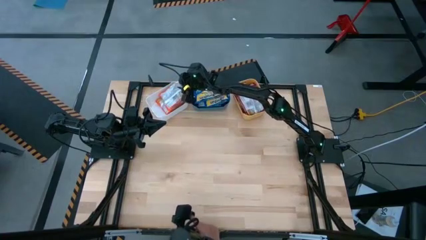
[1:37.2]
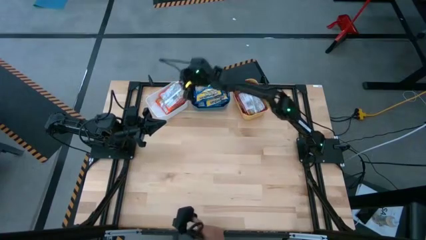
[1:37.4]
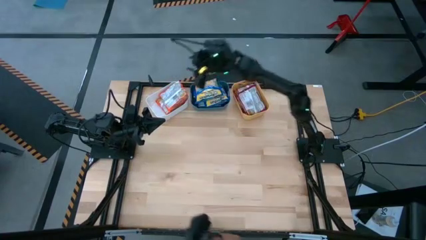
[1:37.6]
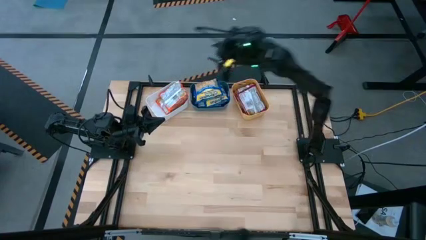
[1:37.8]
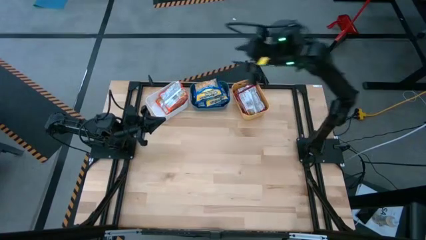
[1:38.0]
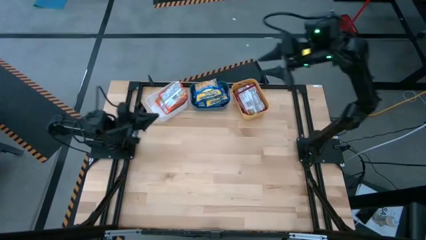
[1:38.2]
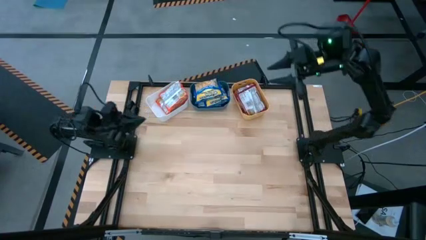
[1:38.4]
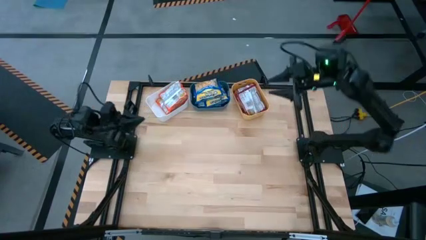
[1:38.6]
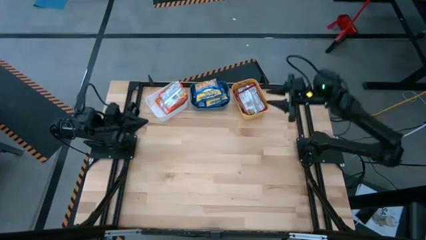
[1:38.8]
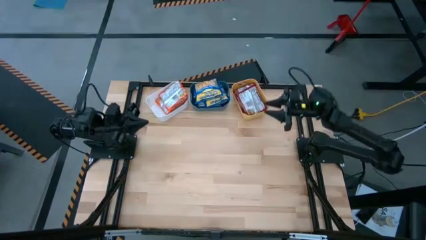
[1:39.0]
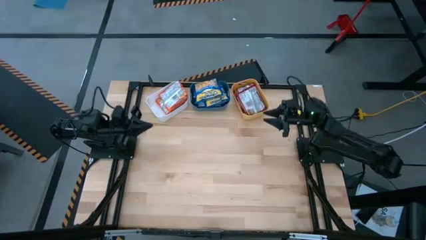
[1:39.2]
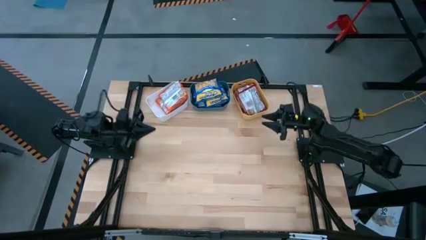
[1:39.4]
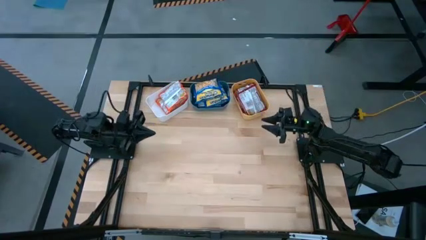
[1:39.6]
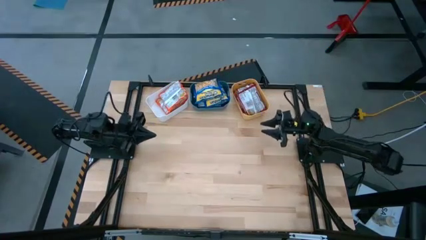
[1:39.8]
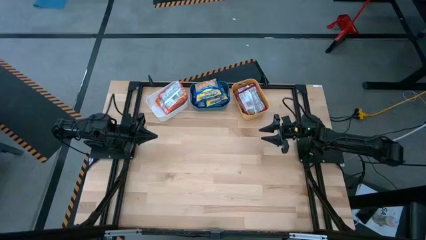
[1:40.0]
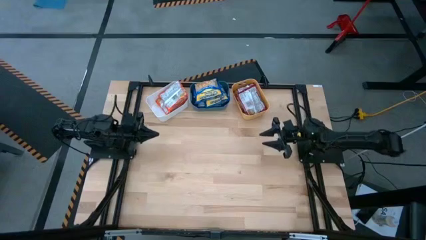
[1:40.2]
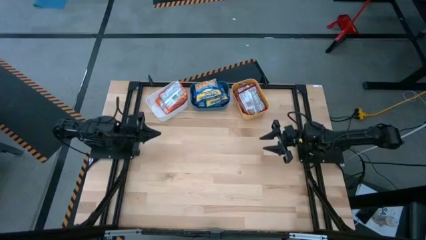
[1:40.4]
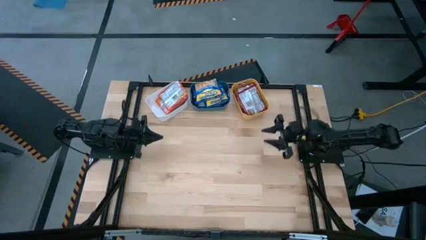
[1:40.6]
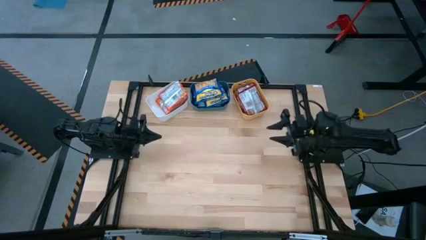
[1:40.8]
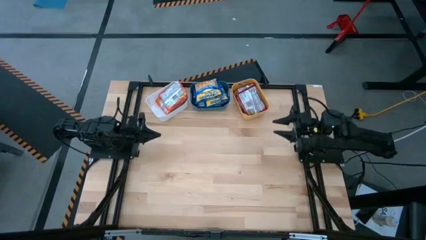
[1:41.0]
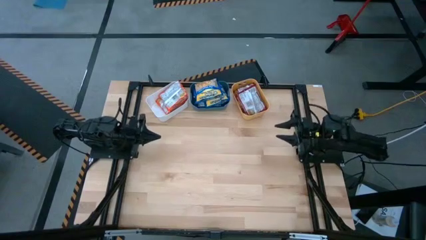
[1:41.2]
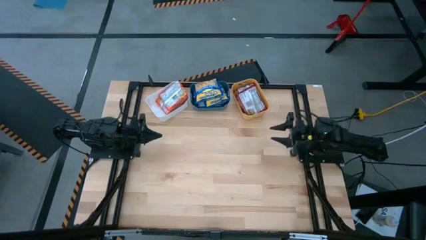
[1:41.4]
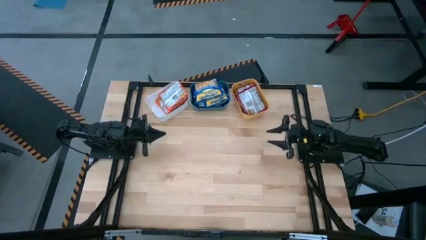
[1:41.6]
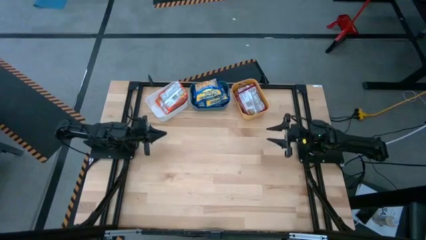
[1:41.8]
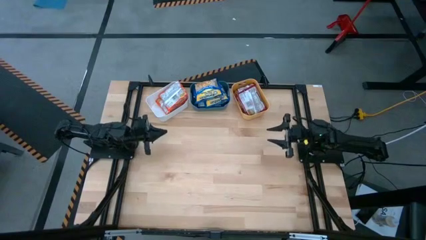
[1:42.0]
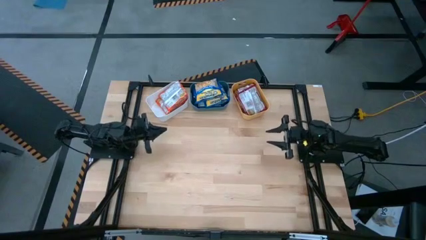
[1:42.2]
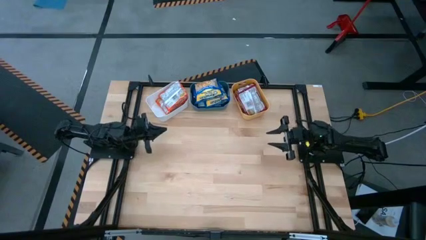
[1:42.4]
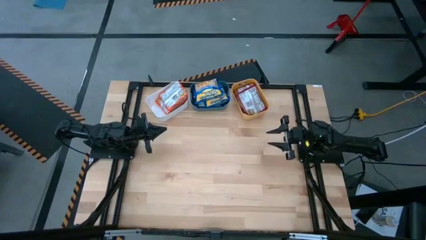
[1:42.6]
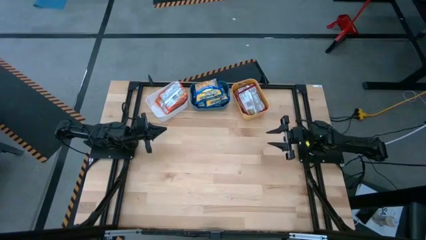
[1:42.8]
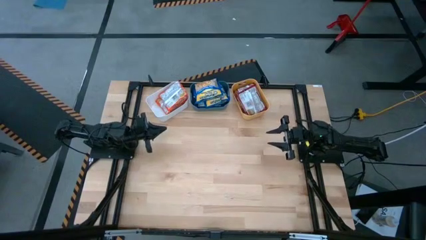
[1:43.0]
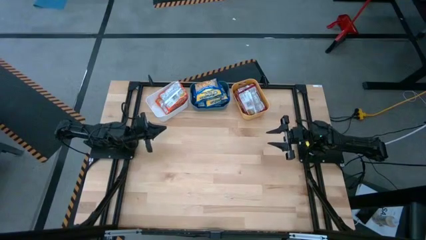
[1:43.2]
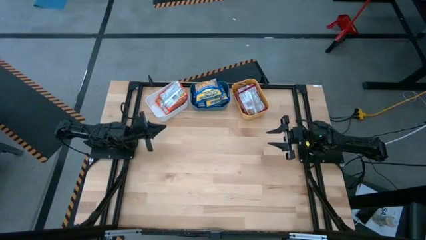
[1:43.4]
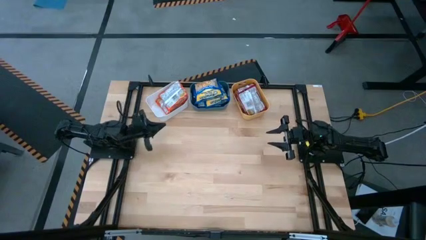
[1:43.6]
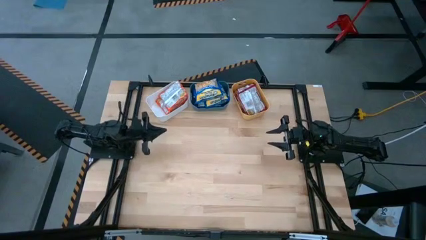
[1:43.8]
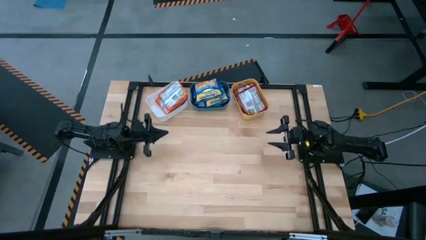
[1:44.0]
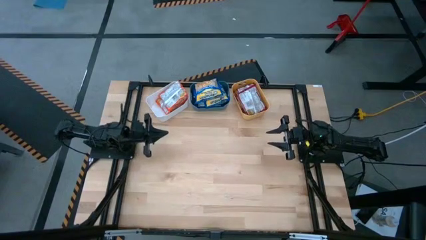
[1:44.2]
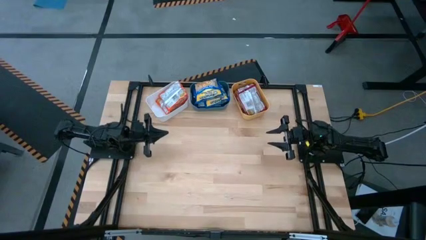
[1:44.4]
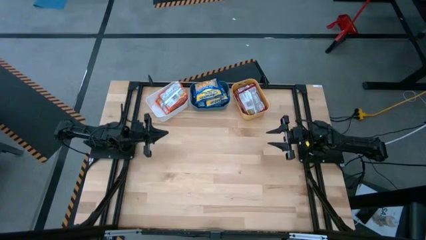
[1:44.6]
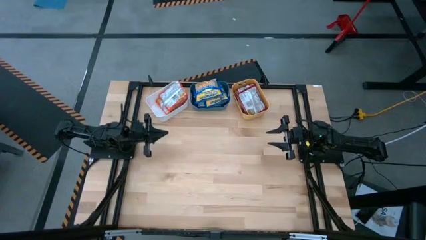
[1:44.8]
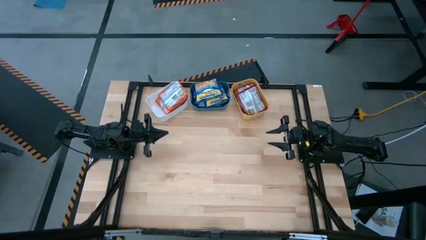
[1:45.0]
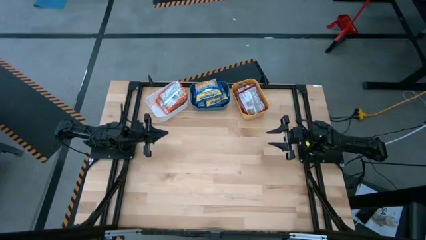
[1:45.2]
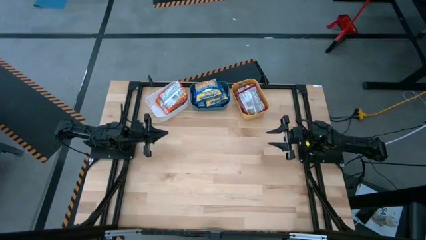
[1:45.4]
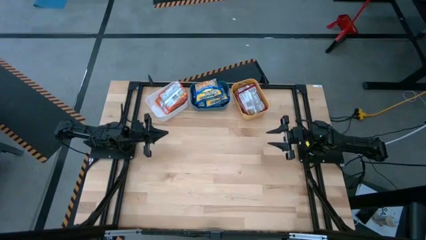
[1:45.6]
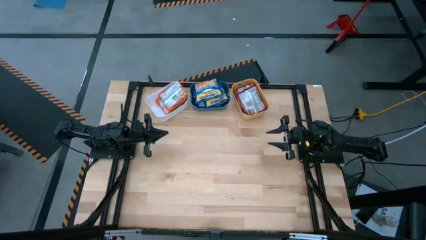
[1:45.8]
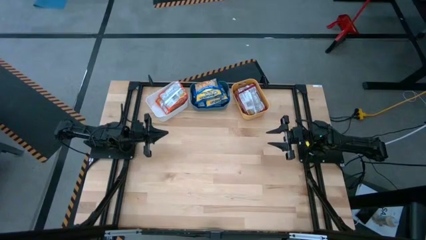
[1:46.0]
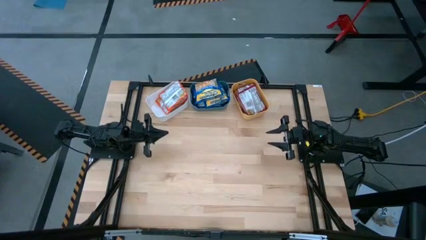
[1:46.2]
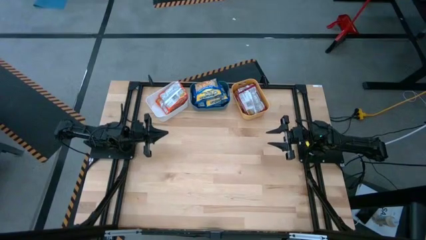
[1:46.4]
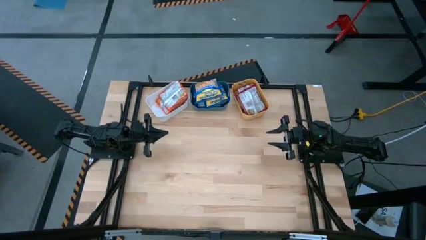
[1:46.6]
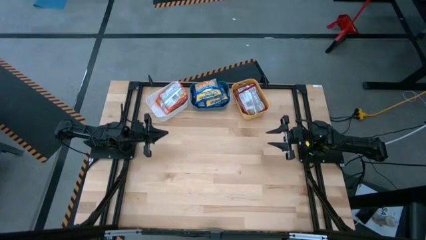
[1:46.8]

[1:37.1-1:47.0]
Task: Sort Maruchan noodles
Return to Home Position

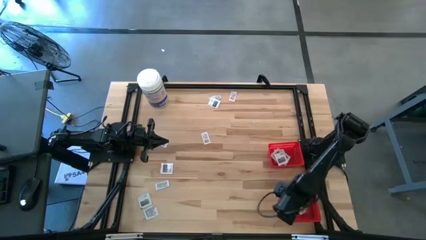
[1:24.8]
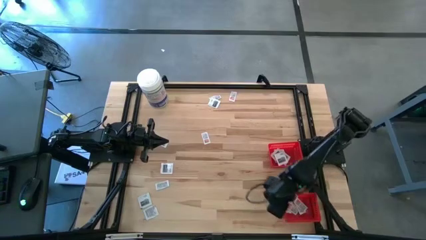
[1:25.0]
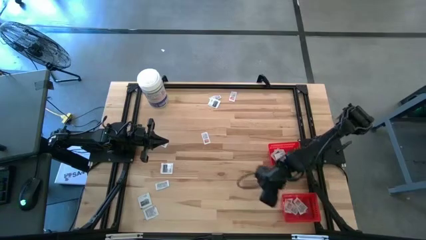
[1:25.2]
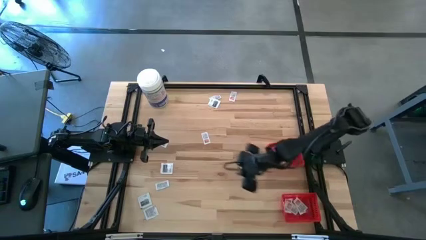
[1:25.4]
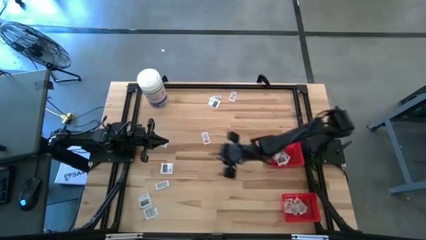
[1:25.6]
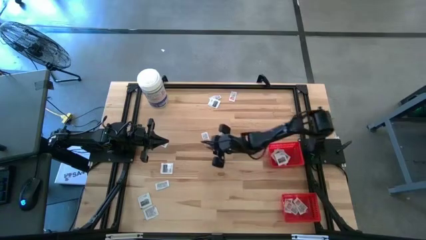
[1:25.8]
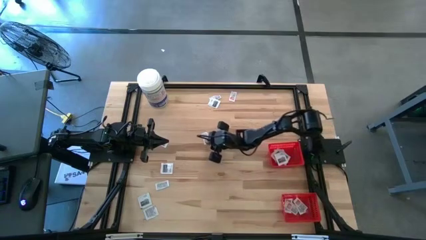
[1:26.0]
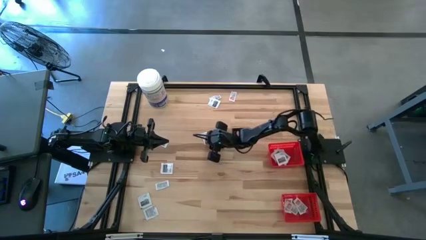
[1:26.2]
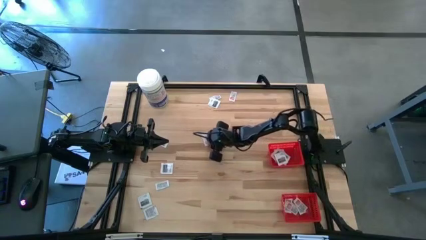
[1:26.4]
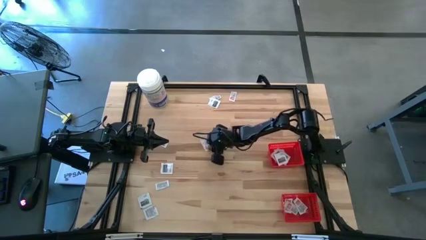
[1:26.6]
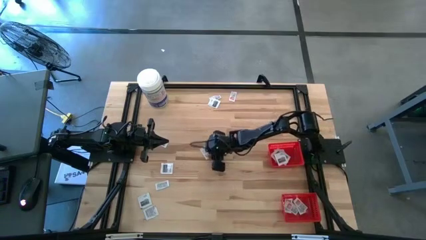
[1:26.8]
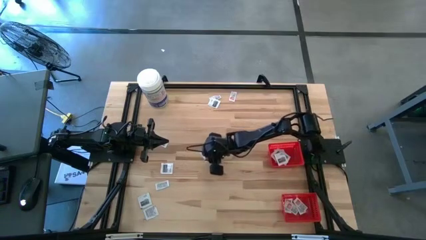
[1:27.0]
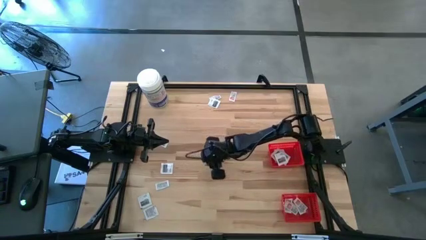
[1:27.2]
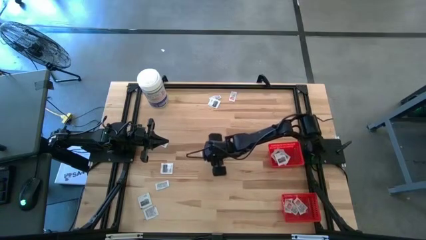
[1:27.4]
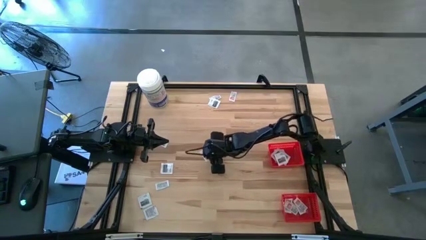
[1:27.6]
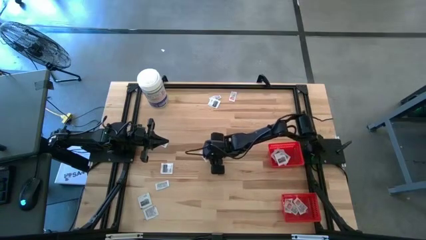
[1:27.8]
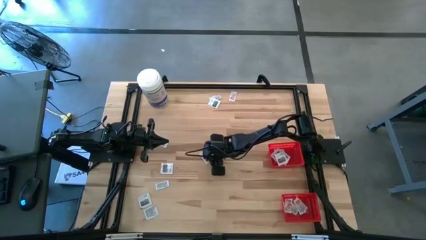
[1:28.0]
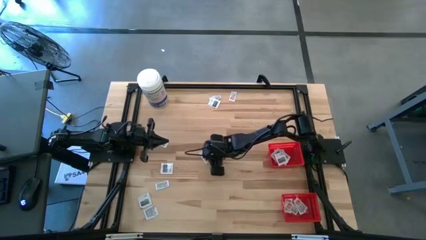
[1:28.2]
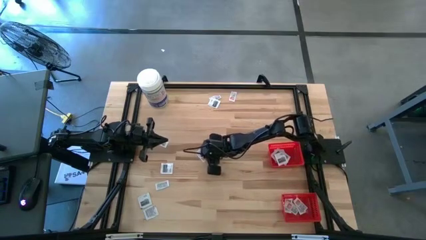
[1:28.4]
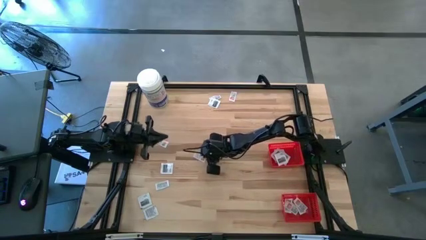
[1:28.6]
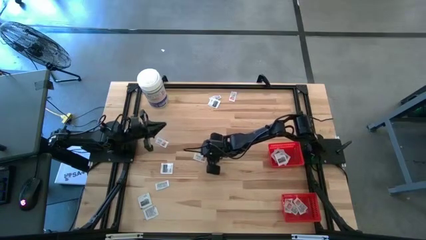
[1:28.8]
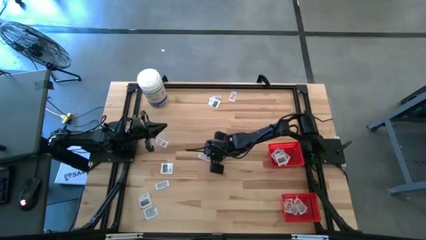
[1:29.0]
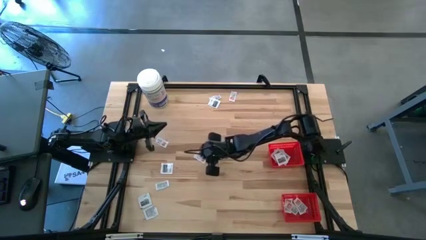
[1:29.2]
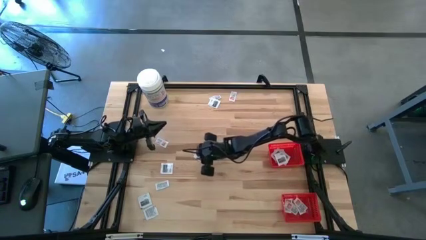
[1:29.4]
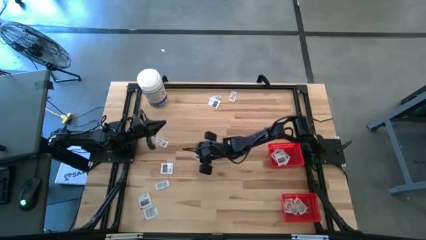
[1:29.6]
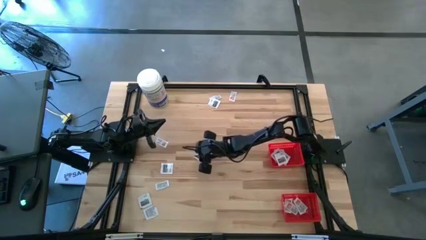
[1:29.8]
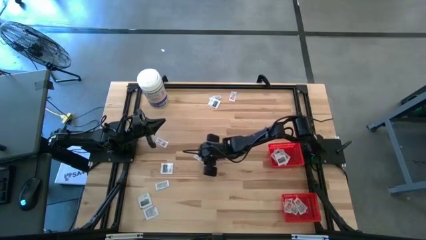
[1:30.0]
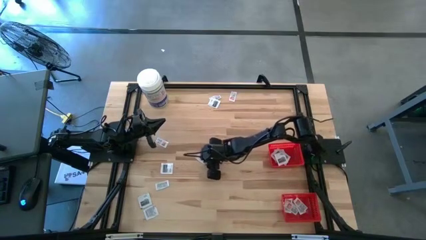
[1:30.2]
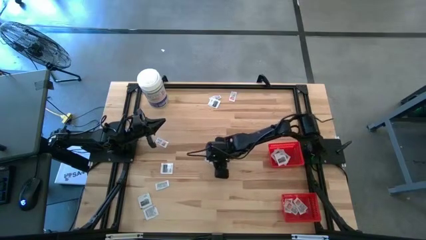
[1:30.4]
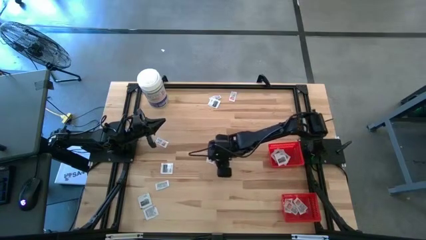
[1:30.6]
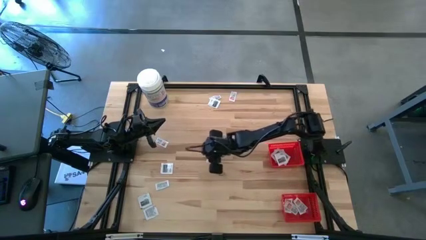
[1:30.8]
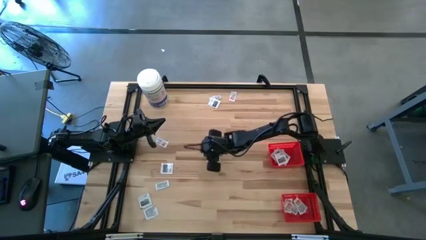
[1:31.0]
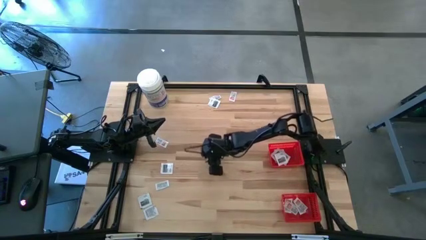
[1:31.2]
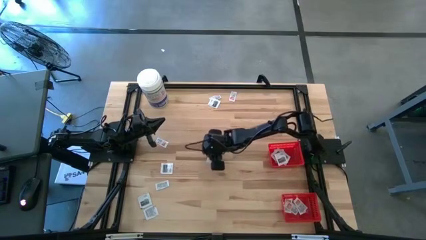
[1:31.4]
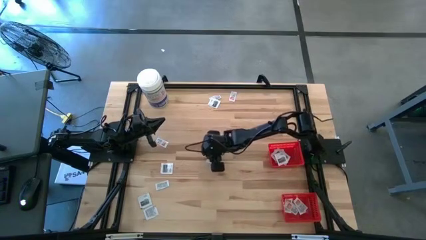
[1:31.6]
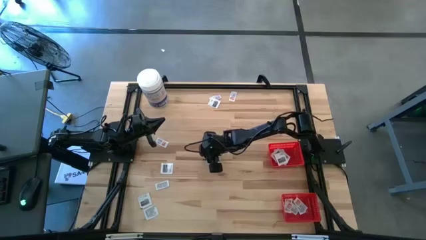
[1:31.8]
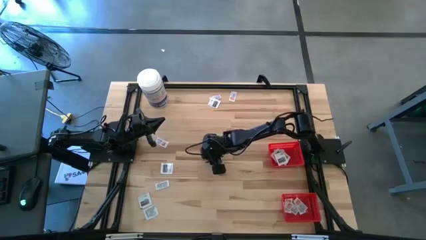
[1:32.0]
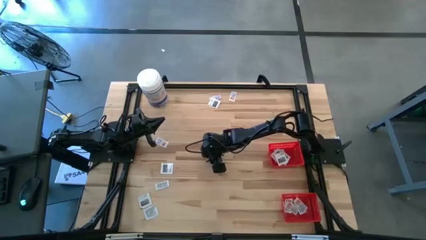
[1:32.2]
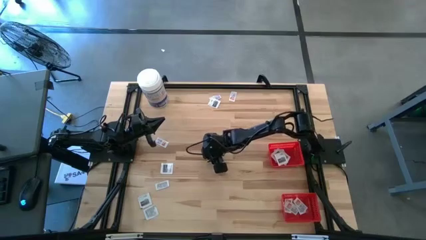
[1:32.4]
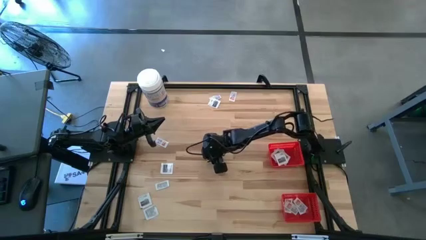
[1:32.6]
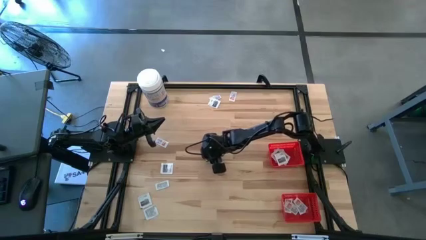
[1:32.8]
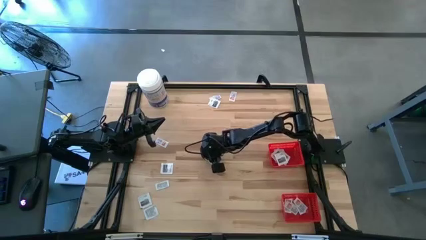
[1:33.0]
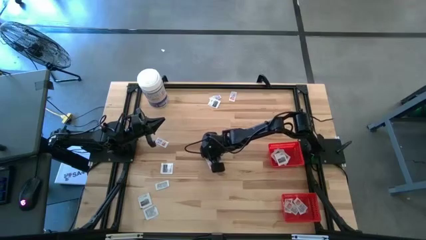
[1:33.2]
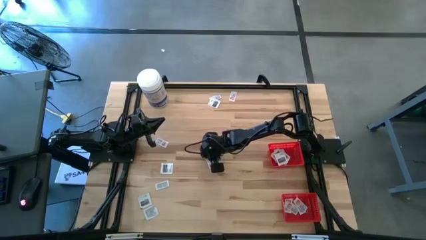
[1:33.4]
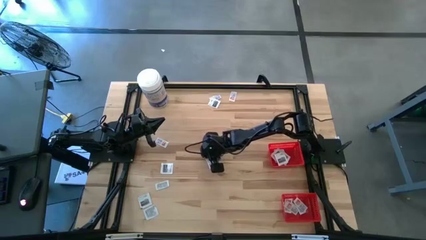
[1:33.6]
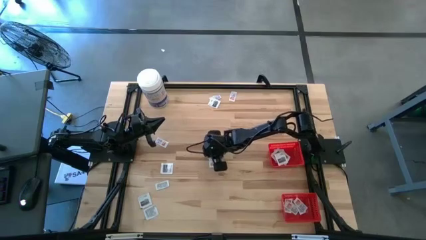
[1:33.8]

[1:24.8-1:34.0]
Task: Pick & Place First Aid Supplies
Put the orange ointment pack into the bottom red basket
